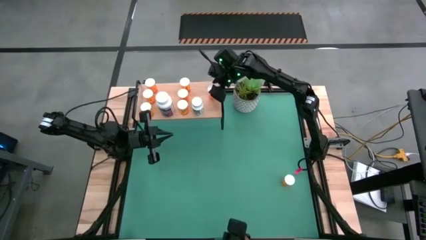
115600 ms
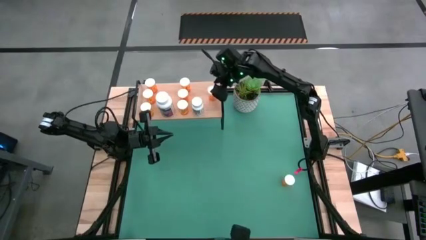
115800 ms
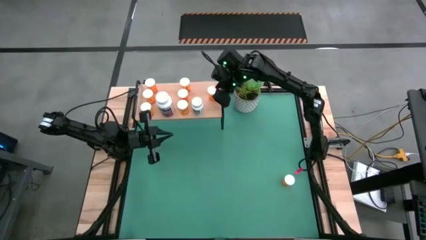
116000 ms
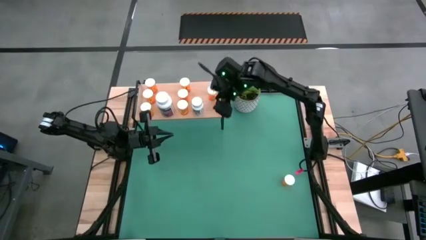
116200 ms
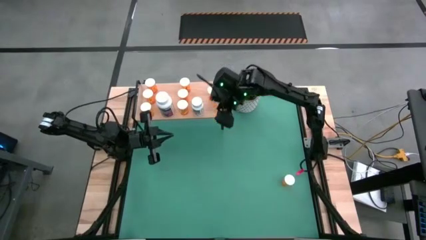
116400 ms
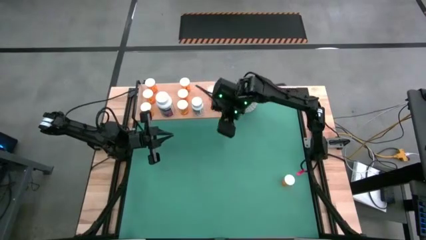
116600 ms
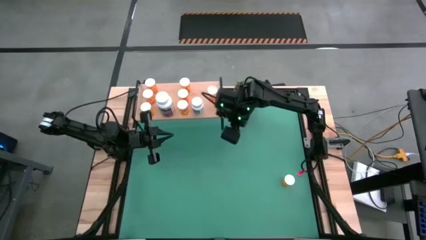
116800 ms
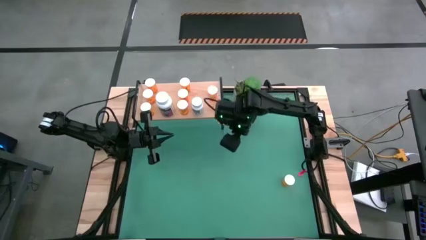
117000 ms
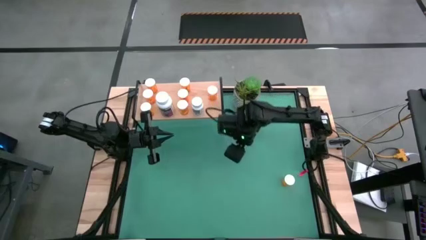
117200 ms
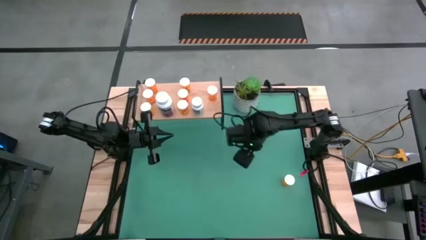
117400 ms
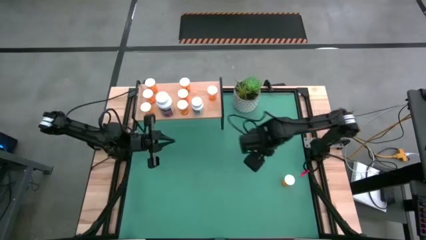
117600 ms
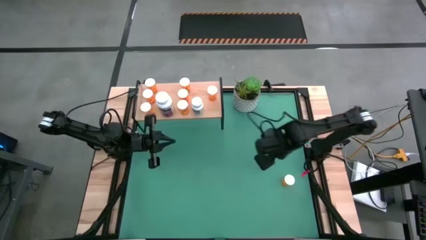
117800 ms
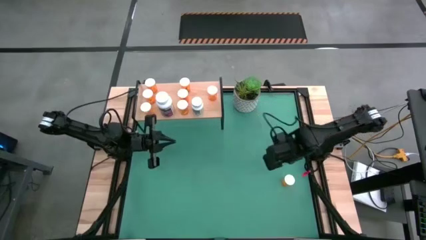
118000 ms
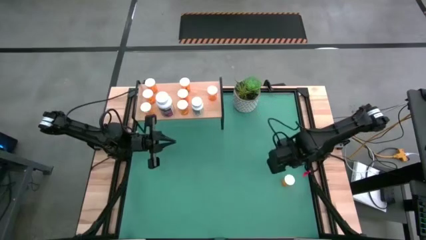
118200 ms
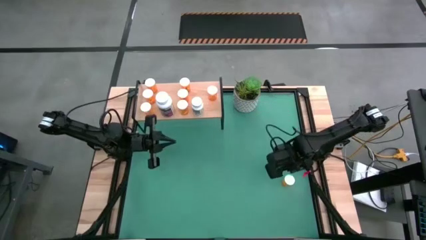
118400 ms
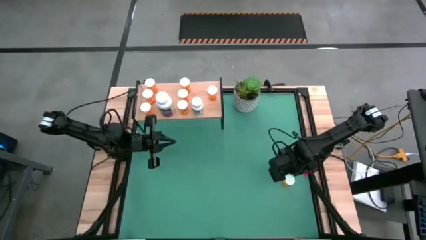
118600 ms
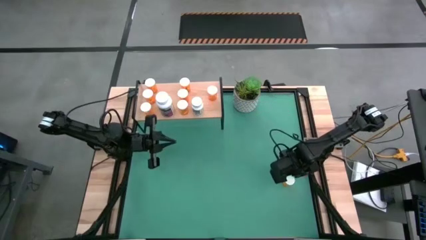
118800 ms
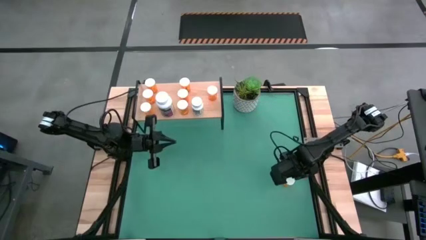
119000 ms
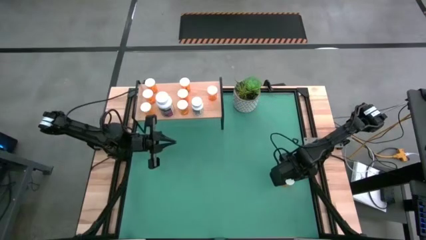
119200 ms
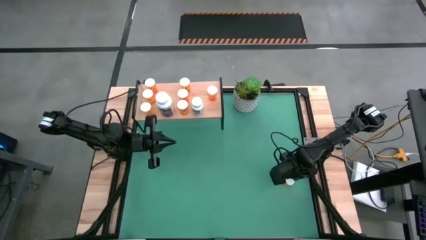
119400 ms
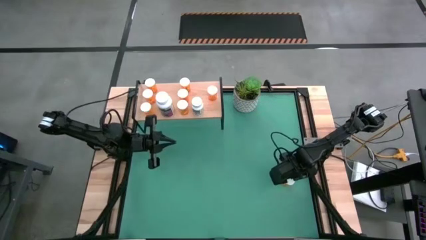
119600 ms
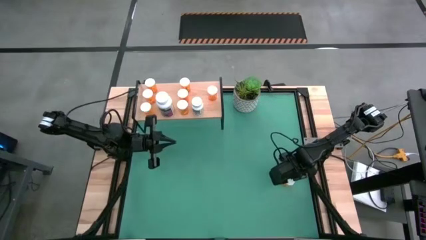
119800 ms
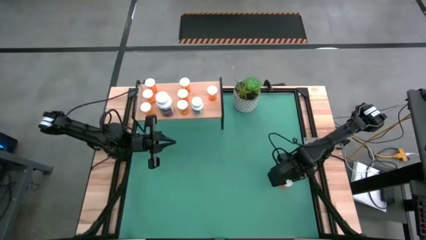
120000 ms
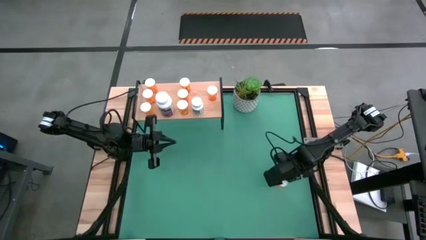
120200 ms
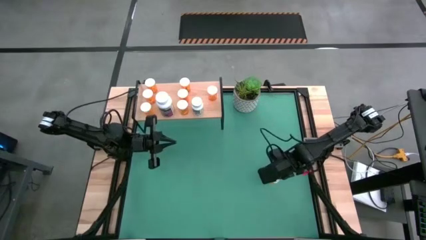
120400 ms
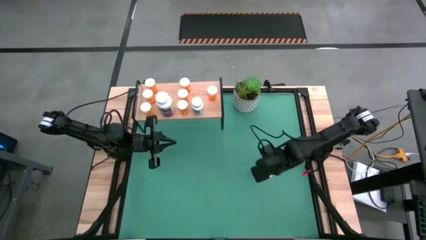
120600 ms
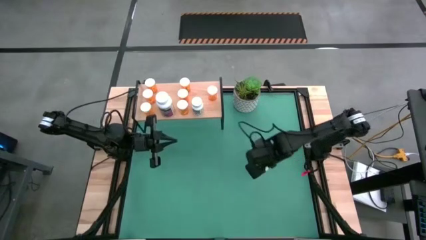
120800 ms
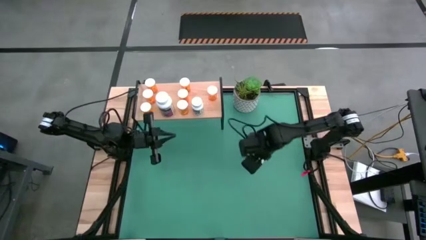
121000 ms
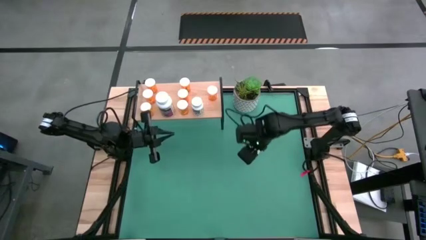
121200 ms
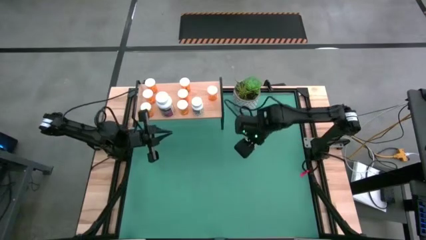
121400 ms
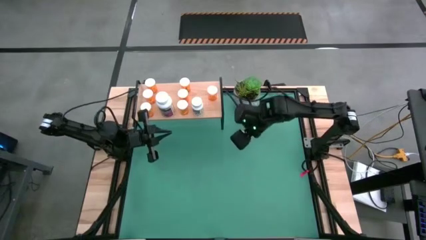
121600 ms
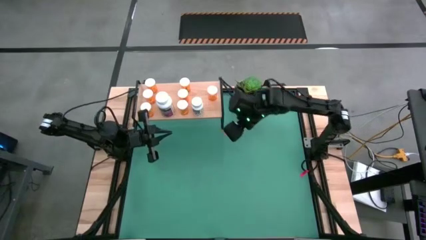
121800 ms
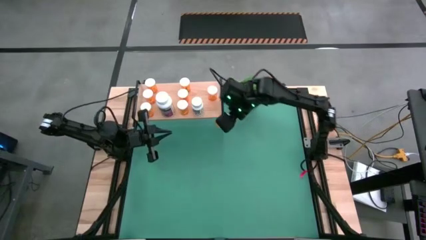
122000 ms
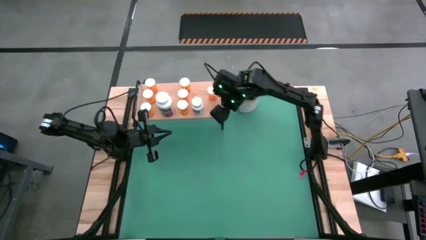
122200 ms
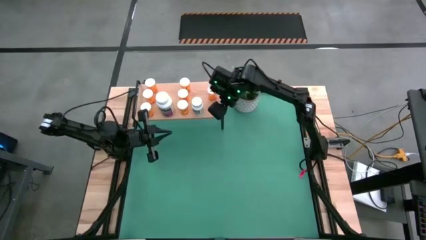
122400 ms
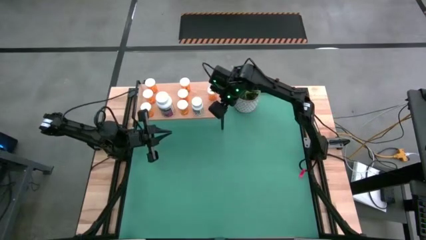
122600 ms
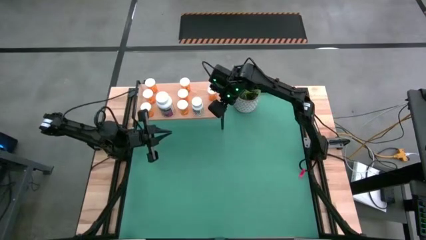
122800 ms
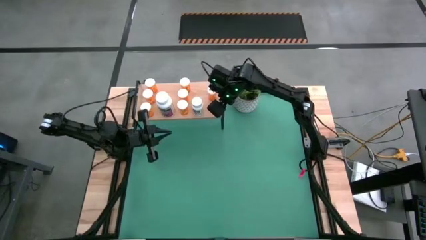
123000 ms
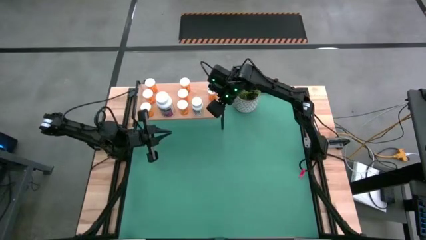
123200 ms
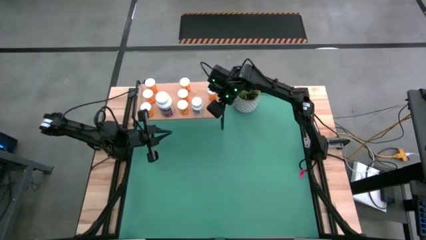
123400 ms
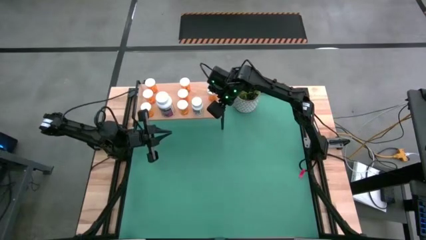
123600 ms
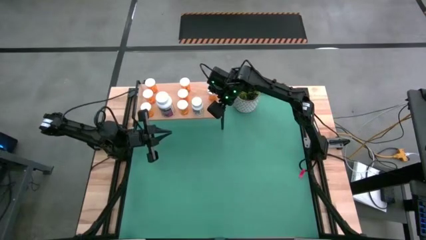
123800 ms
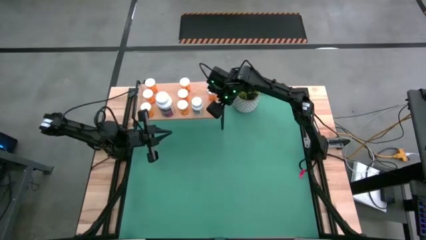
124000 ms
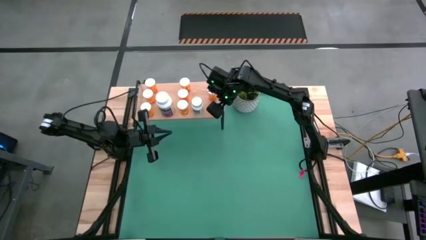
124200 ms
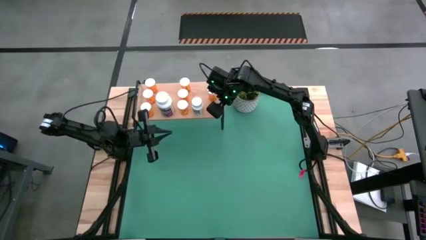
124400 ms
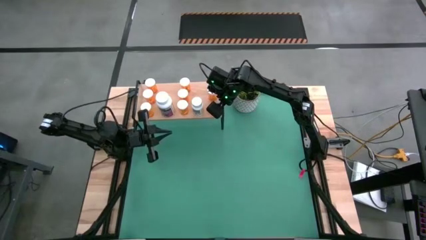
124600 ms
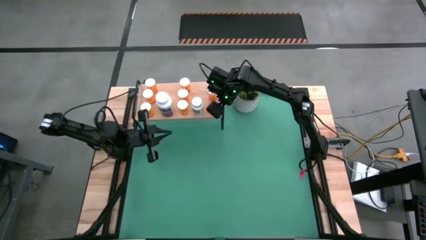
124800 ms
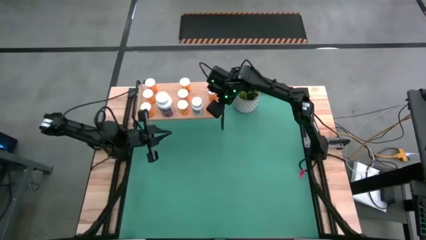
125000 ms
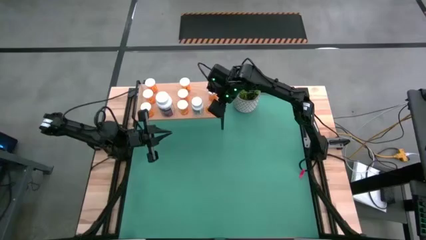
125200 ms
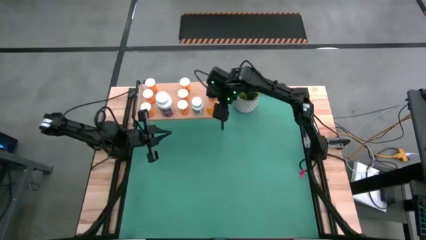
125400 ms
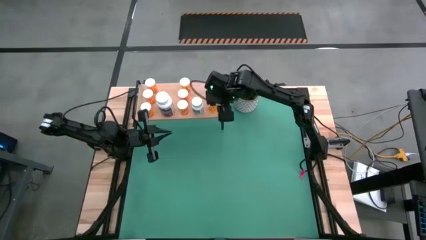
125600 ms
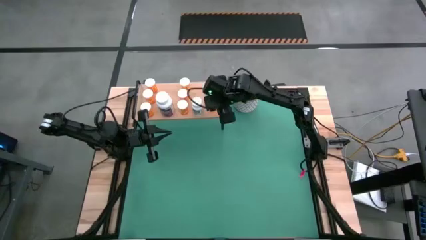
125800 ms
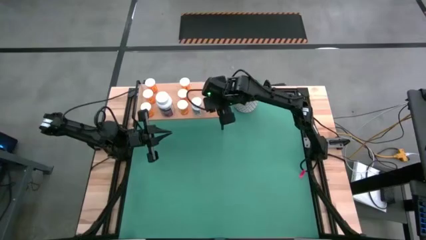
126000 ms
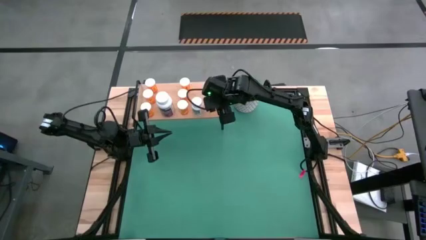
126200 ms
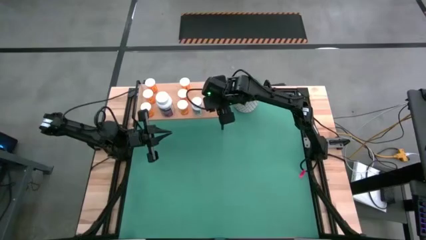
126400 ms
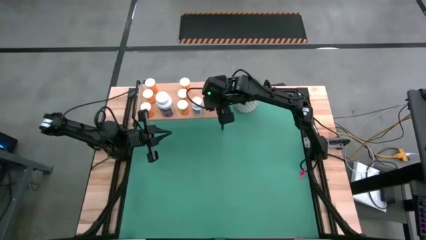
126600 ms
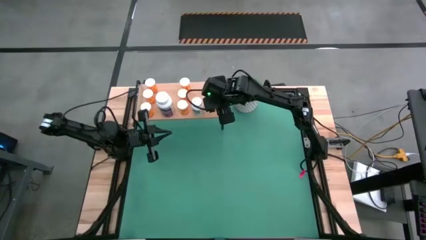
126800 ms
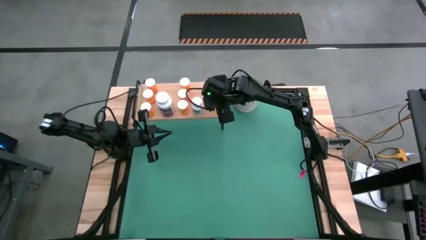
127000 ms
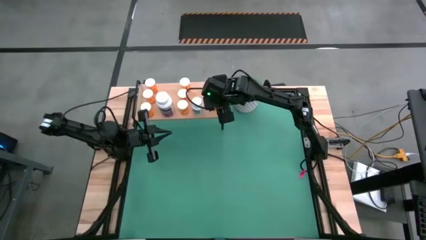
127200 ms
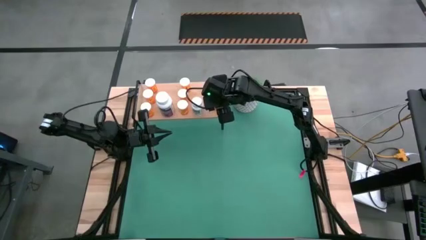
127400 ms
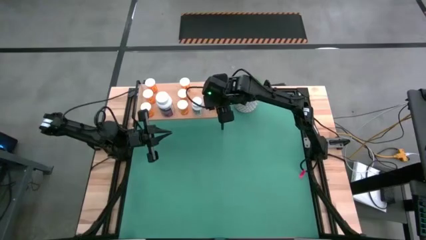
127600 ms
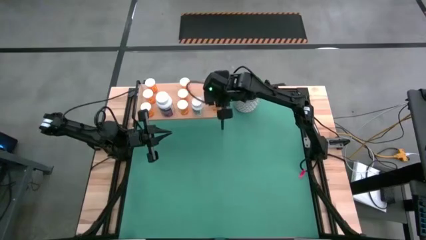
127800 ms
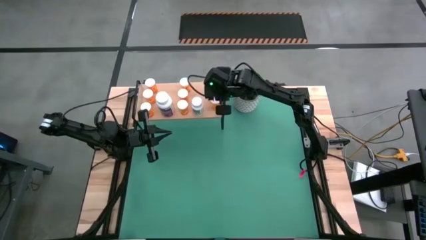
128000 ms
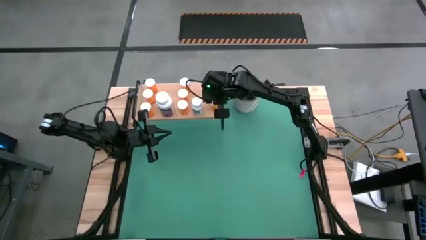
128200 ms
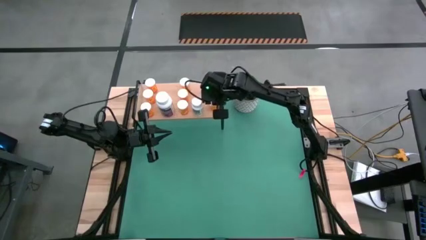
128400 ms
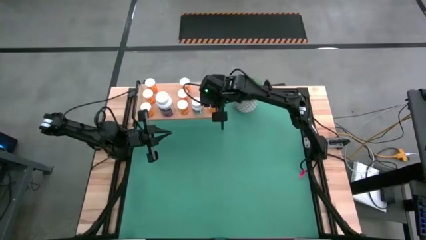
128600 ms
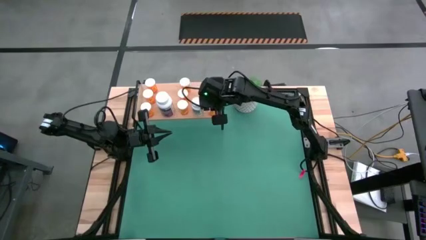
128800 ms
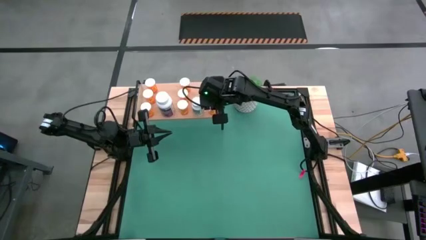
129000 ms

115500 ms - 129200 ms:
Task: Pick and place medicine bottles onto shelf by color
Put the orange pill bottle on the shelf aligned with the other orange pill bottle

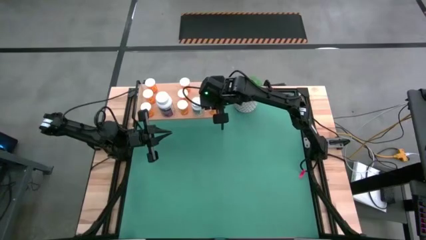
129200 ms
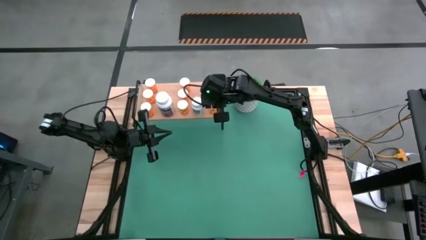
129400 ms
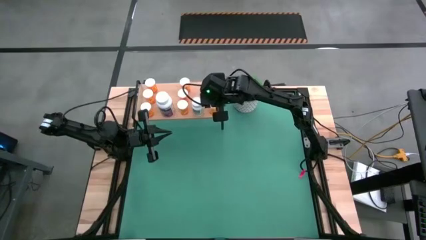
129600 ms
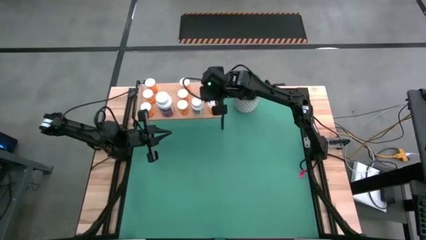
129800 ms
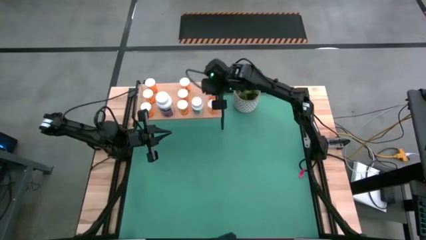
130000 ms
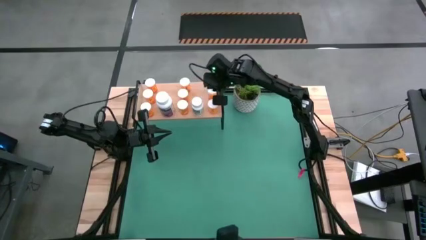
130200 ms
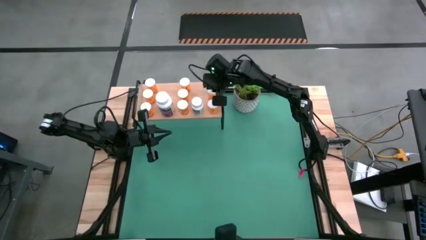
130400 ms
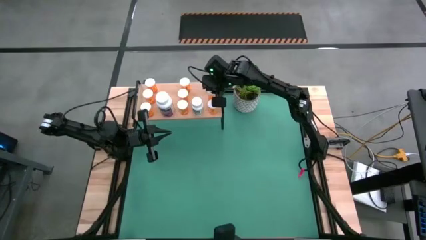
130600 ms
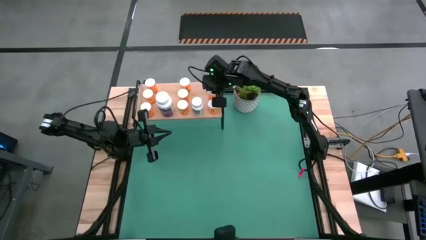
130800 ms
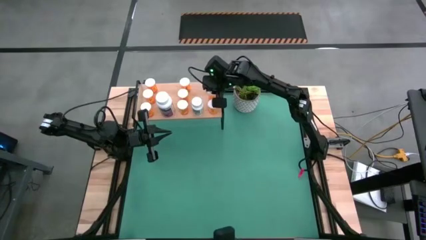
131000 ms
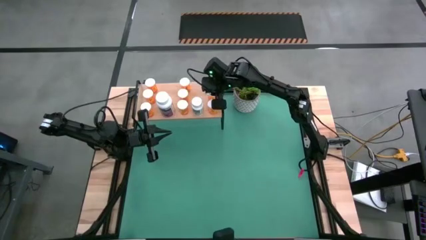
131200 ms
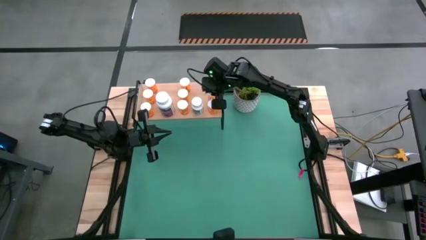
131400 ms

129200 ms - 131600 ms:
Adjust the orange pill bottle on the shelf
